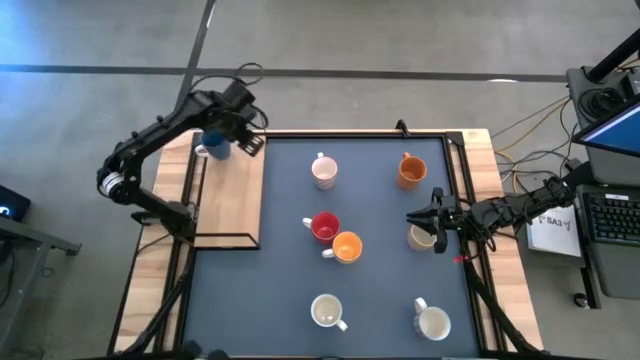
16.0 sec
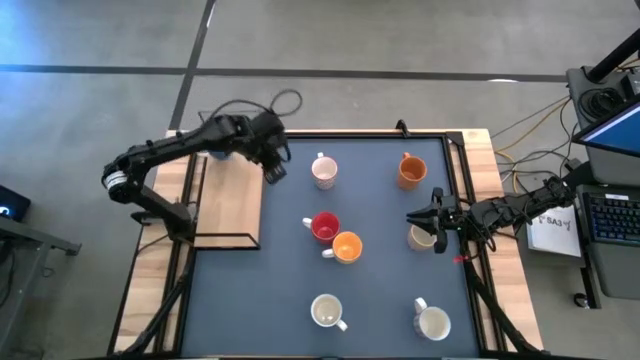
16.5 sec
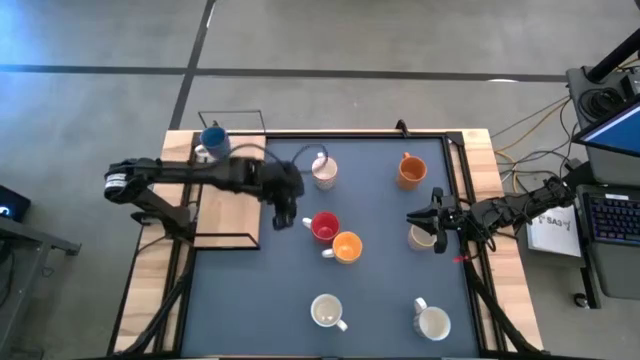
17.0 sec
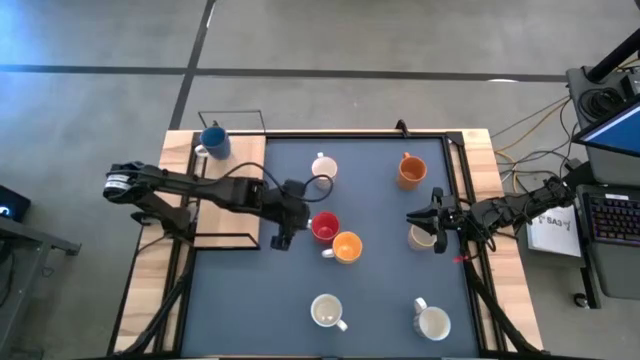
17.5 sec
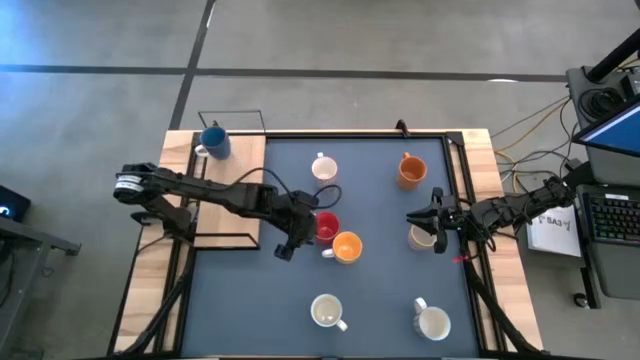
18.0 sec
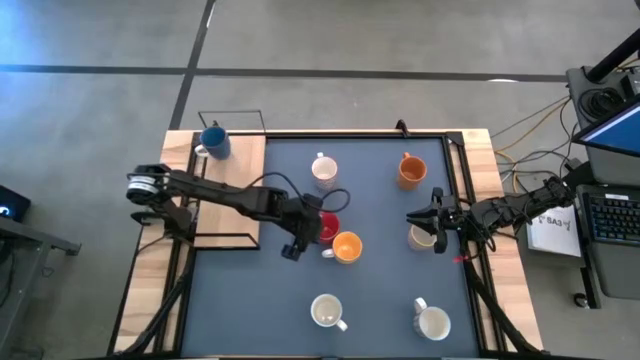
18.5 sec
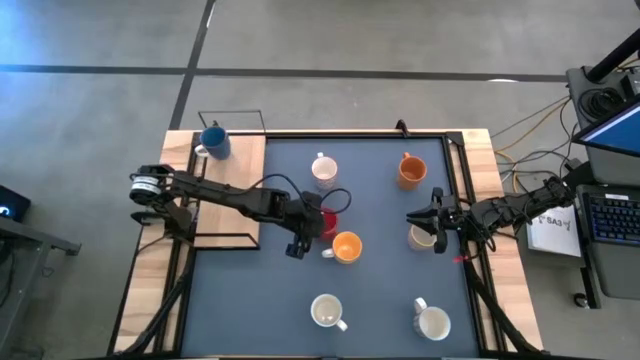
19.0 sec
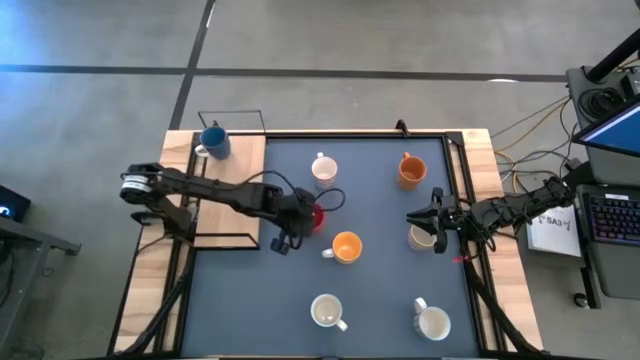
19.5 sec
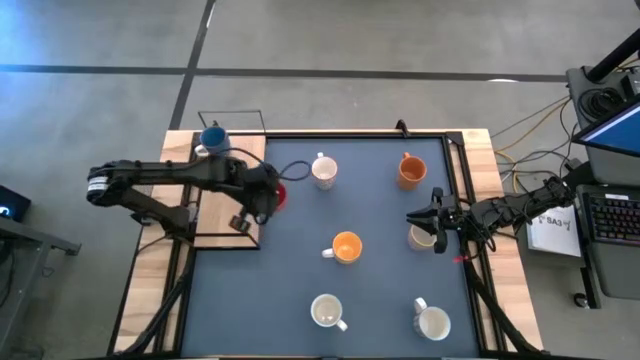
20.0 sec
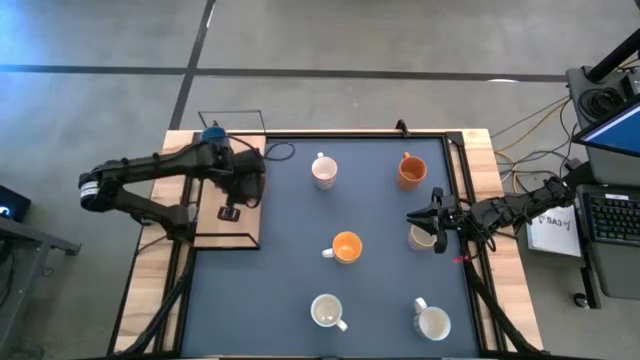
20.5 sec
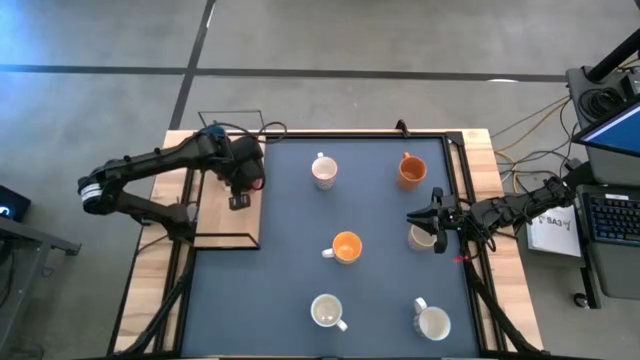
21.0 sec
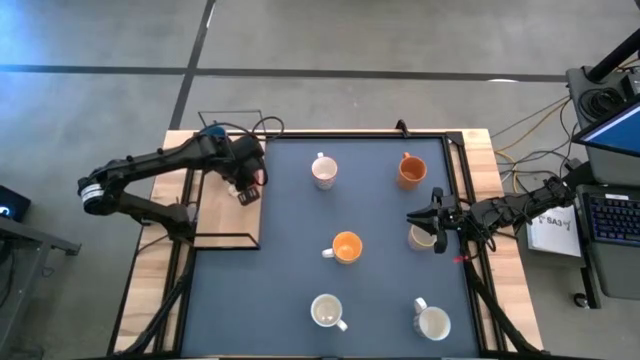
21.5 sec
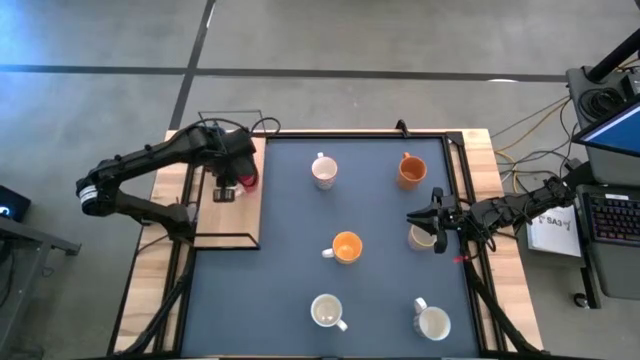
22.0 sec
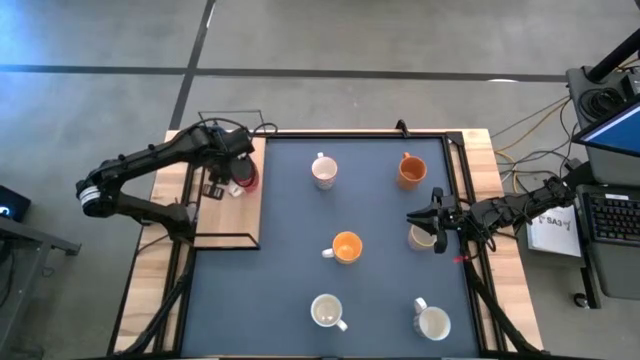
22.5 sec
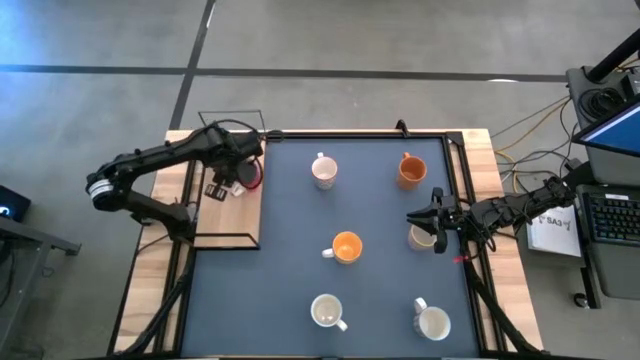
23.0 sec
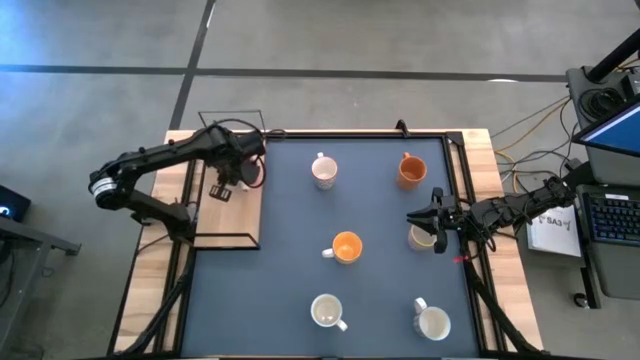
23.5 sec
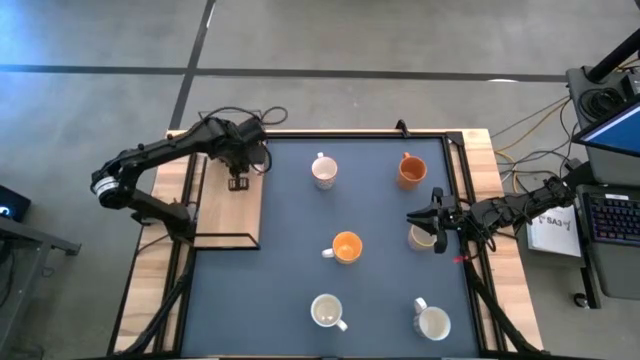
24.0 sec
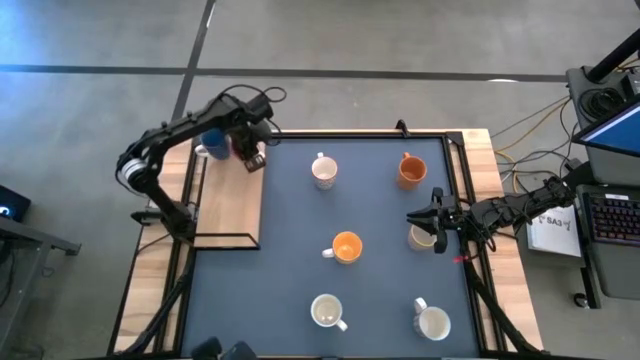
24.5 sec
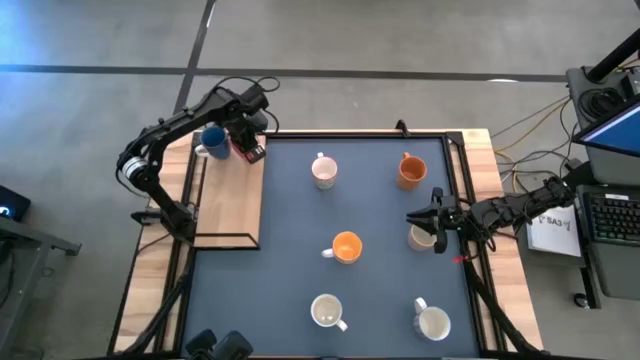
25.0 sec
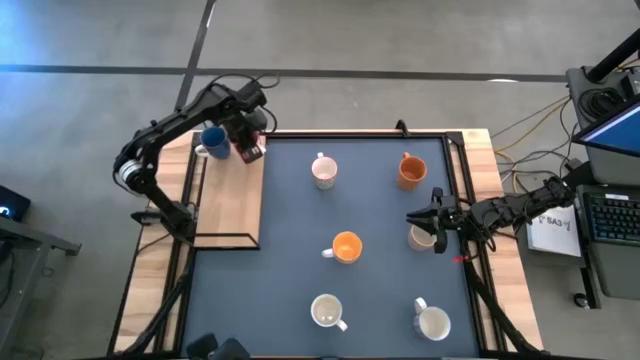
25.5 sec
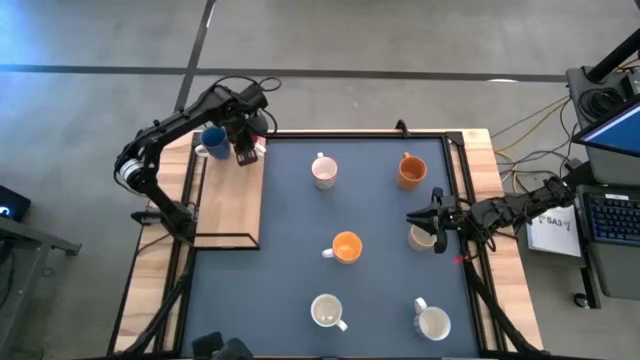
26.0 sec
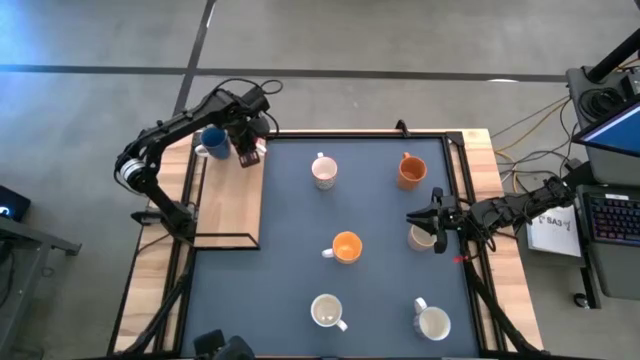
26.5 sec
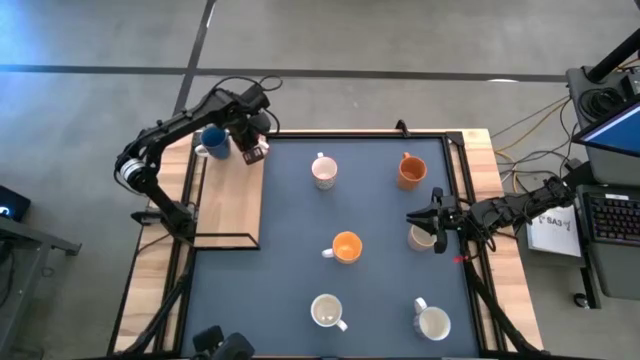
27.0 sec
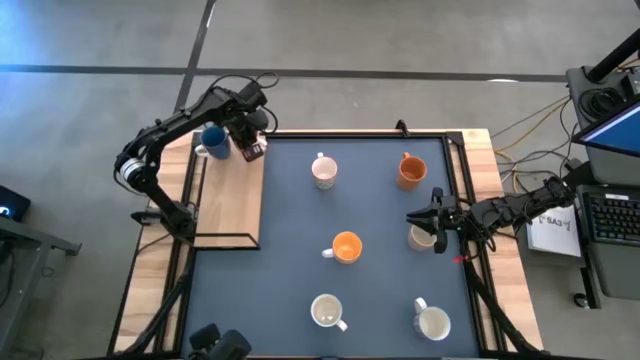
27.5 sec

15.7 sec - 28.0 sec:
Task: Place coffee mugs
Put the red mug on the shelf

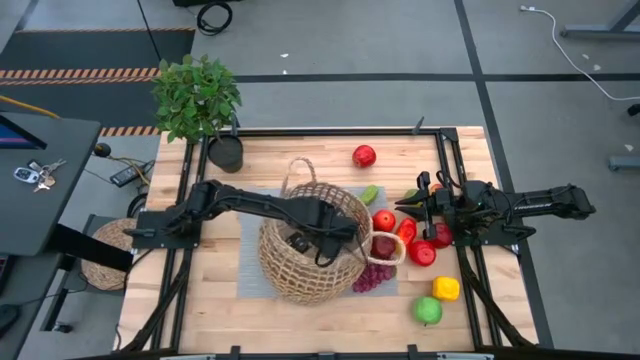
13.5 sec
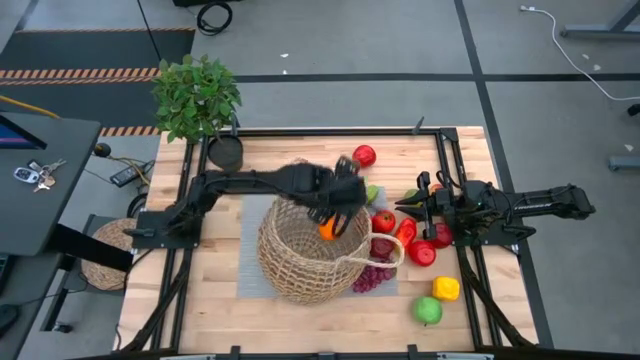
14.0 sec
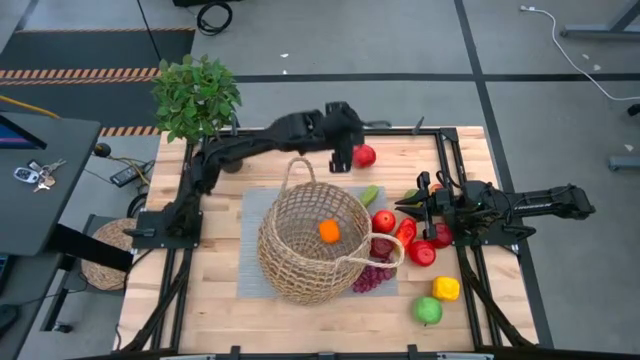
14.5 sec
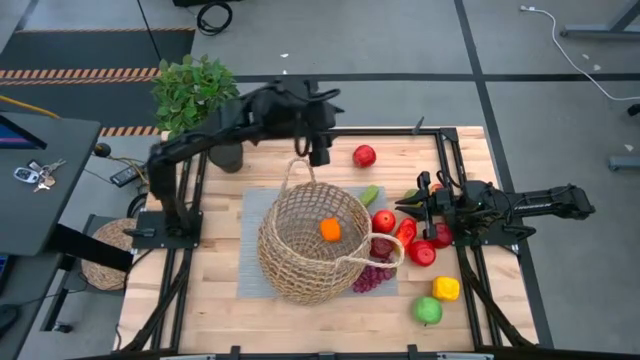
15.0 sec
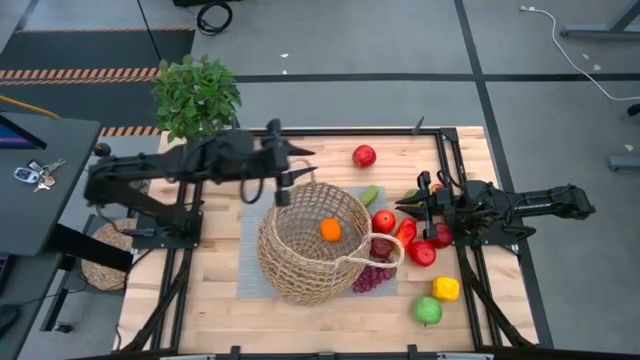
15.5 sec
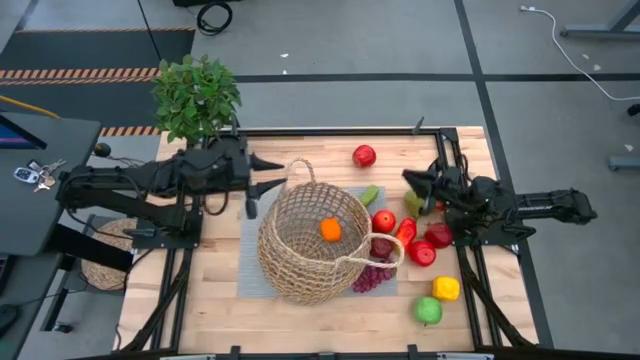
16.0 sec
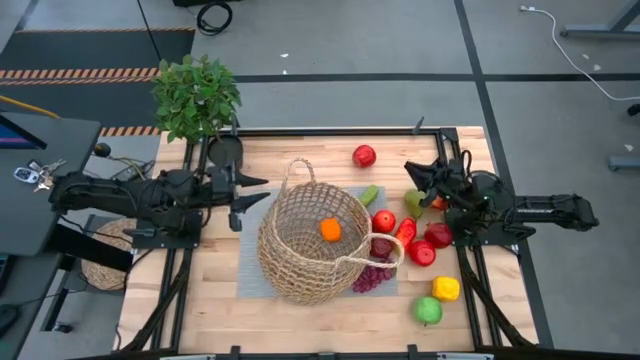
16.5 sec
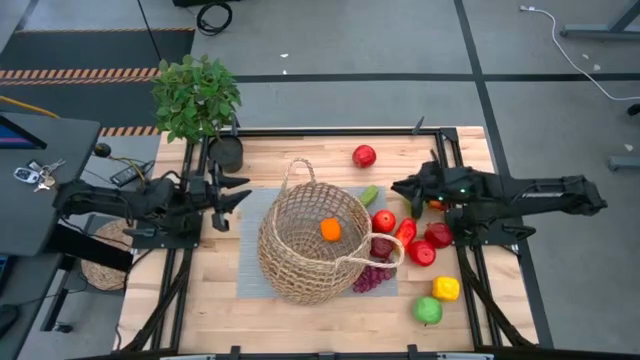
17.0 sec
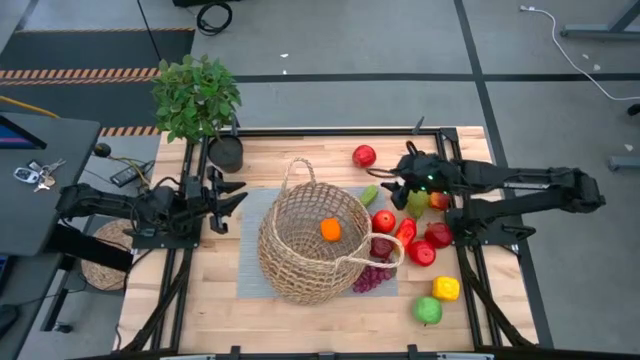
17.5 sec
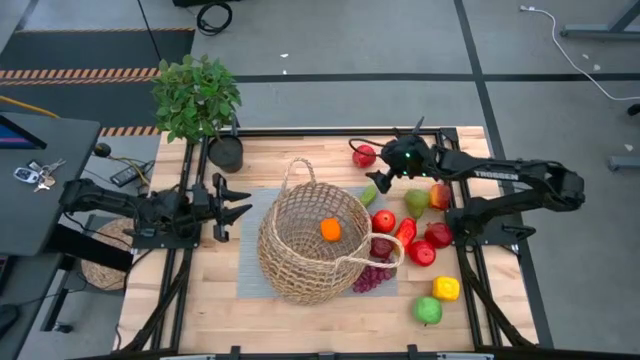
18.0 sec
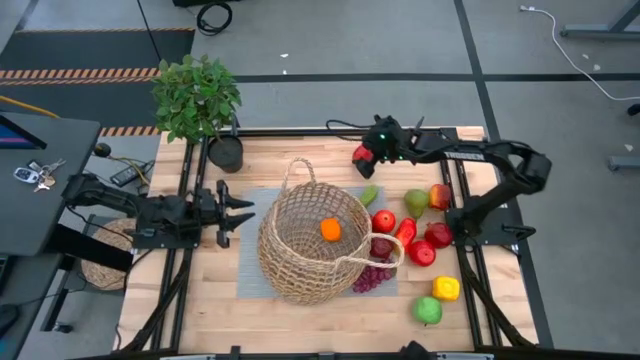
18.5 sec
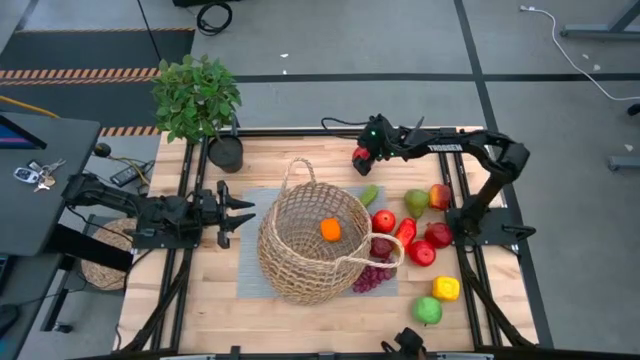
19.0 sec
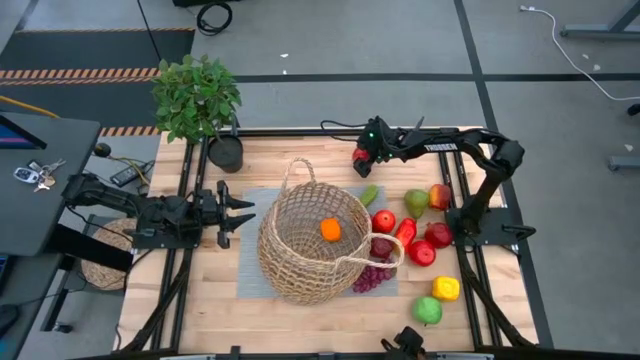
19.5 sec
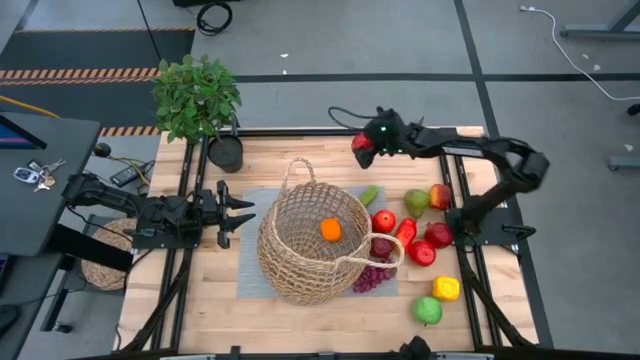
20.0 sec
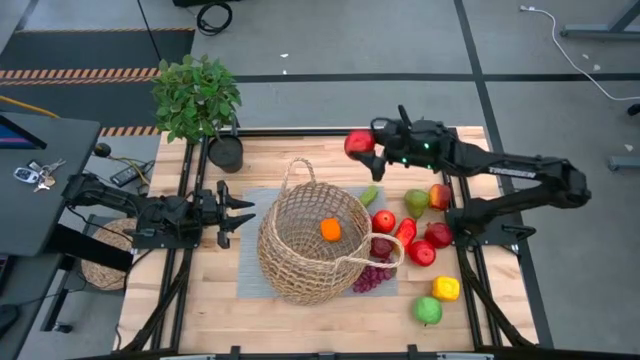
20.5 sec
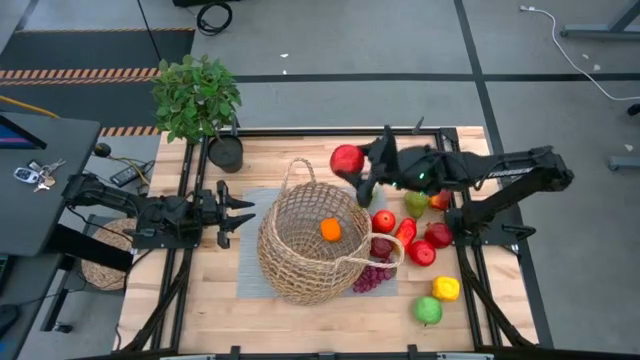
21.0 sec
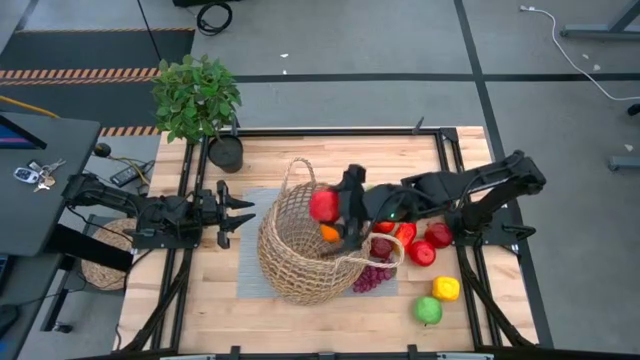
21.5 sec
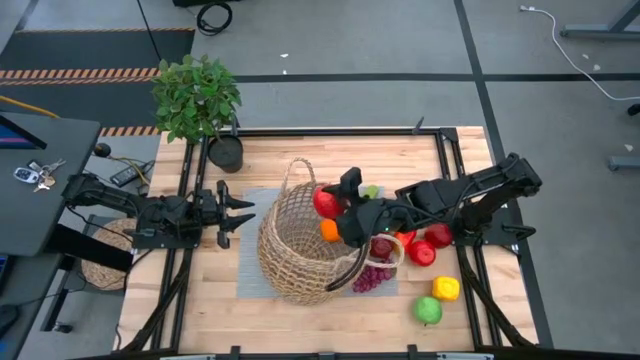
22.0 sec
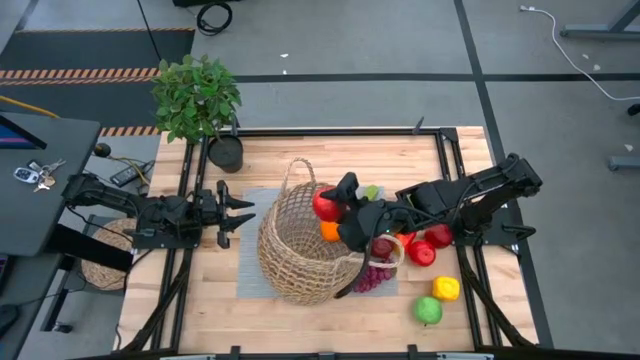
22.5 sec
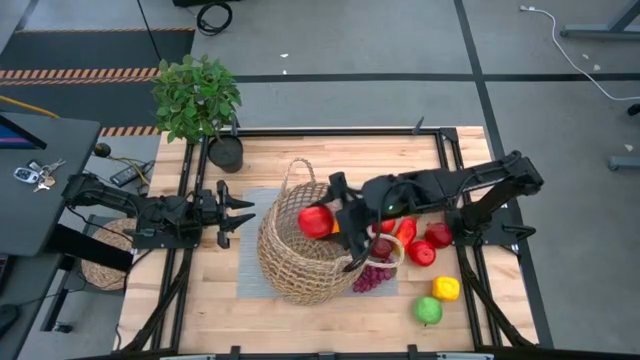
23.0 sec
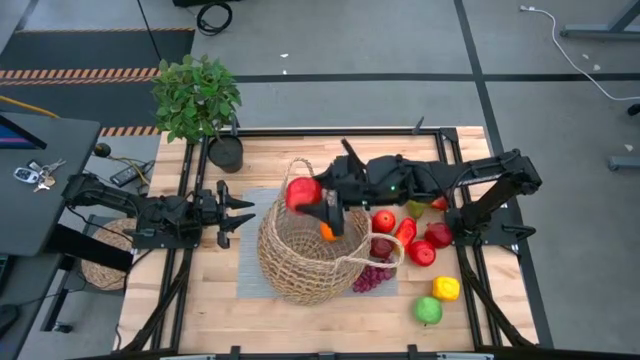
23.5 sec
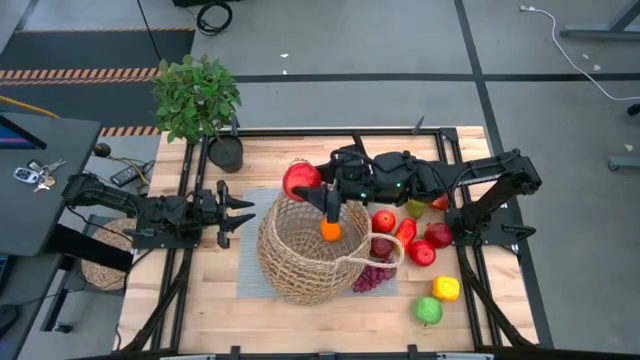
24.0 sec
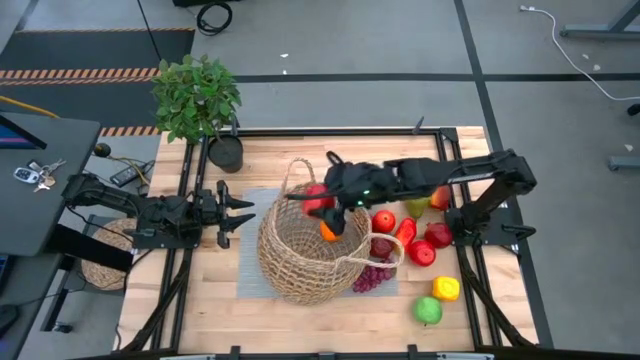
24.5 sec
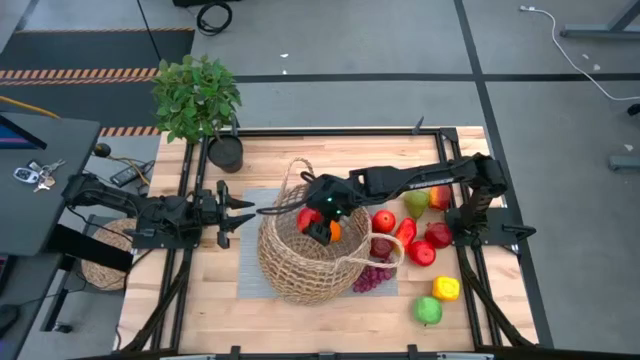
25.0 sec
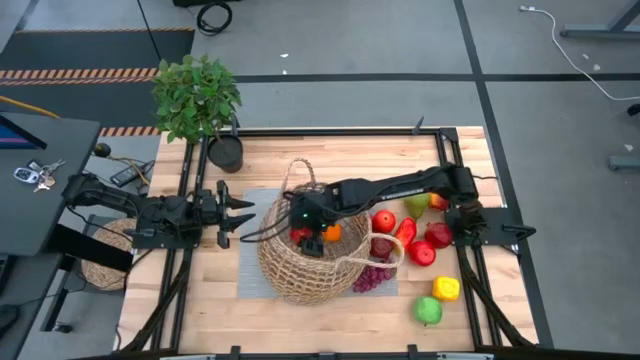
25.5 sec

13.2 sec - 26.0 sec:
Task: Build produce basket
Put the red apple into the basket
